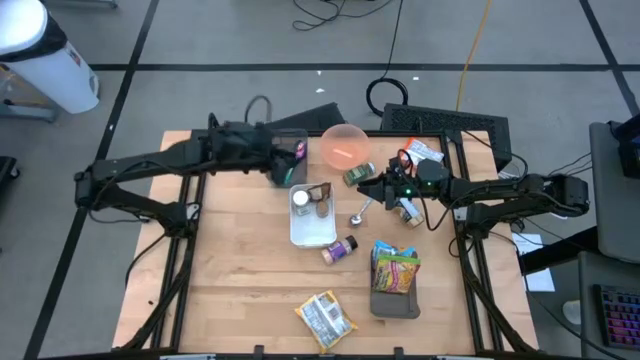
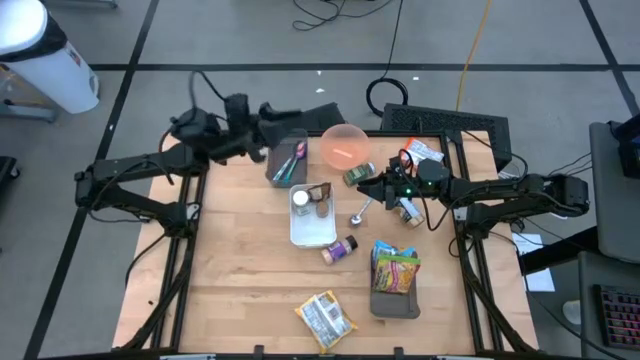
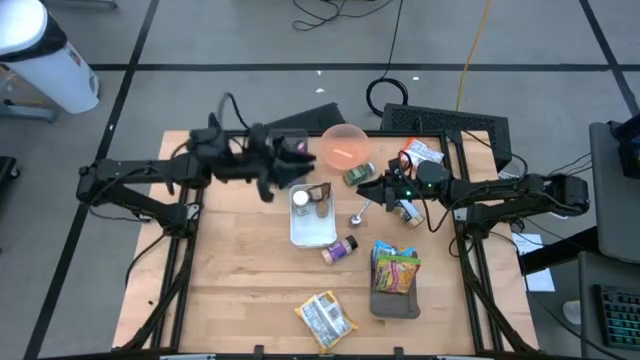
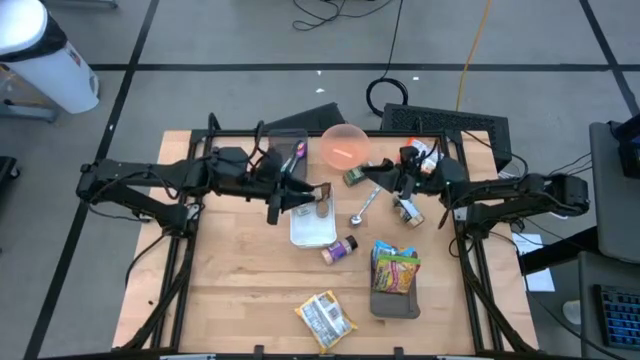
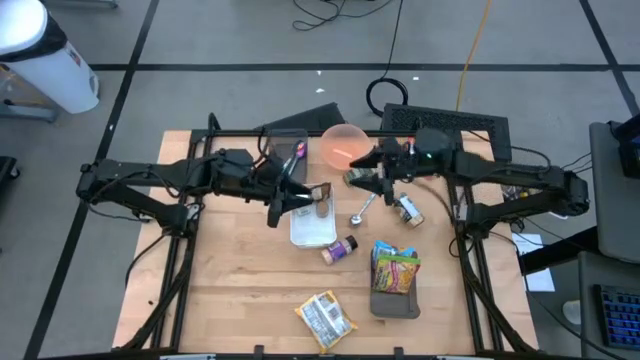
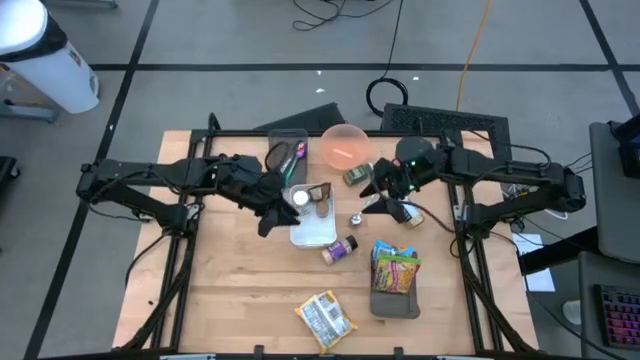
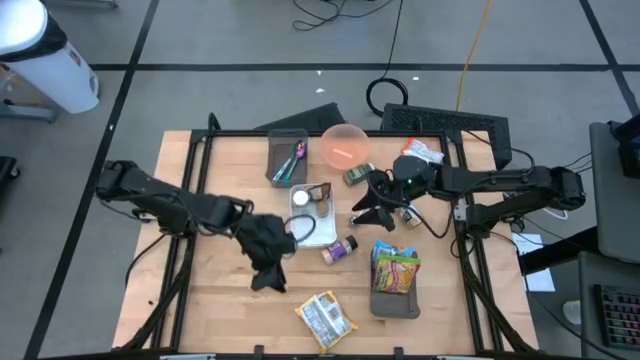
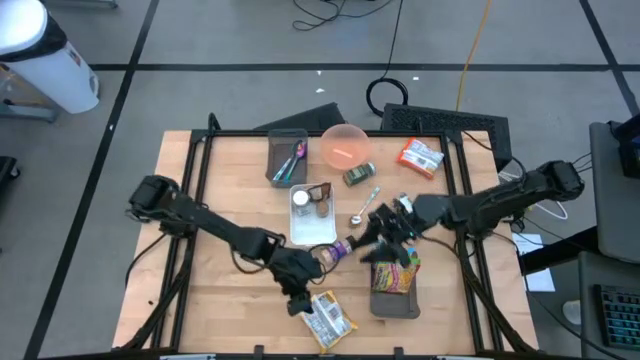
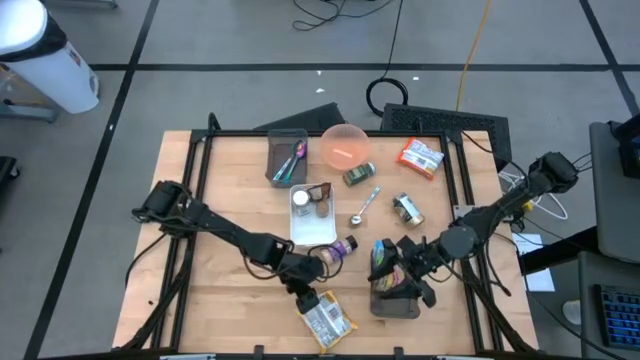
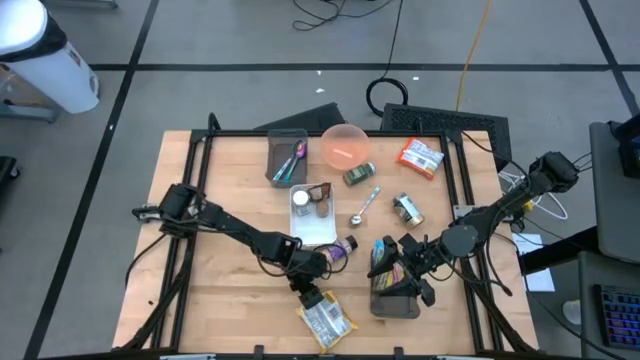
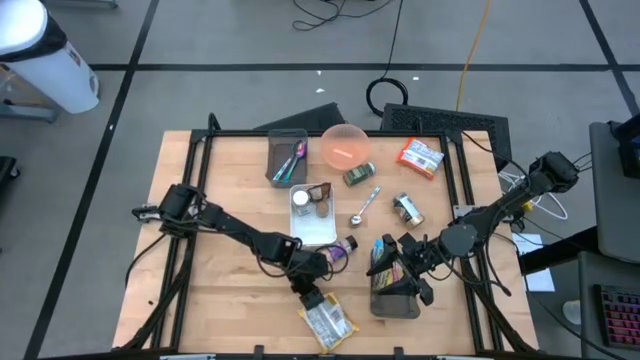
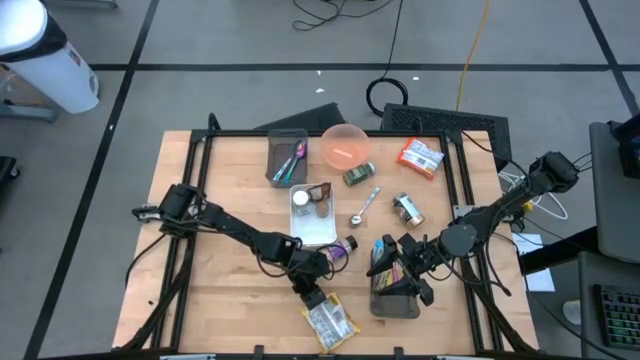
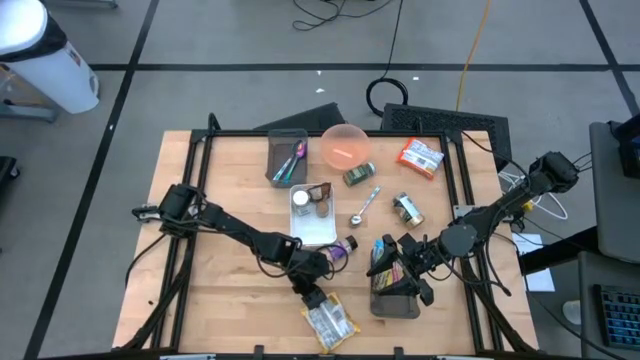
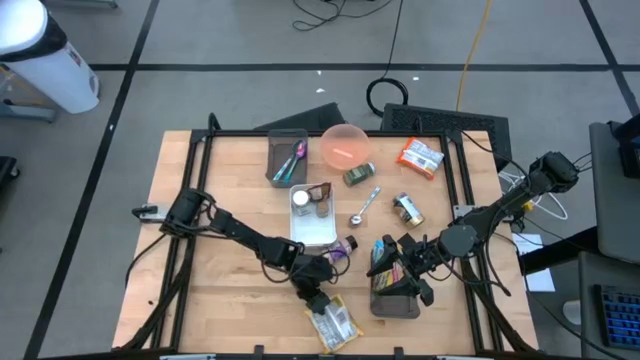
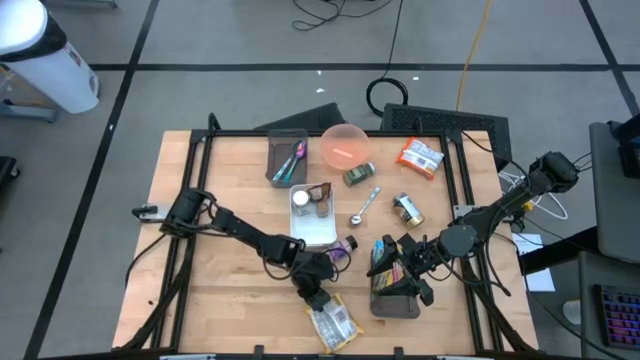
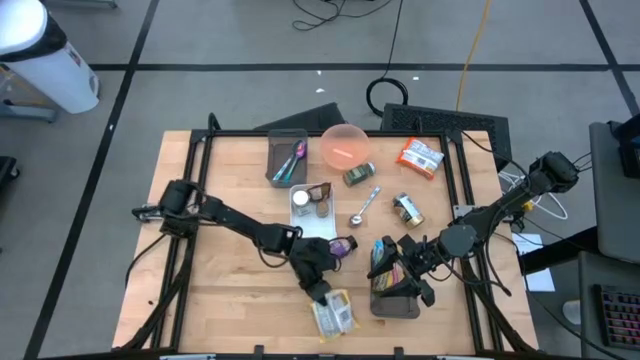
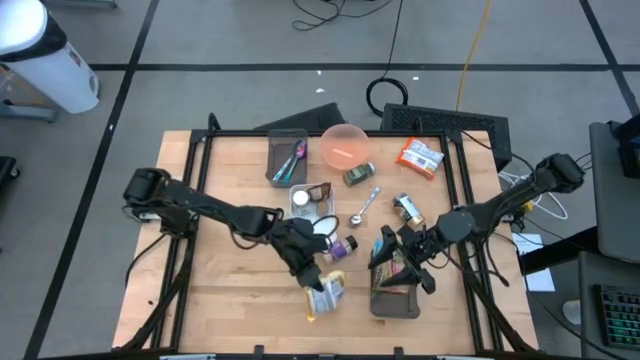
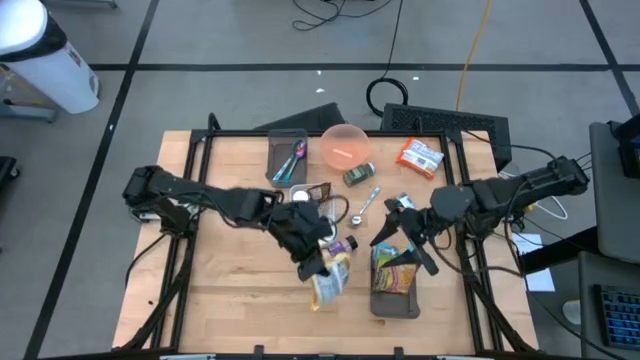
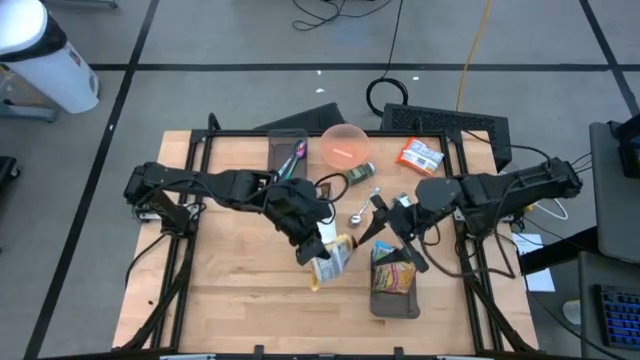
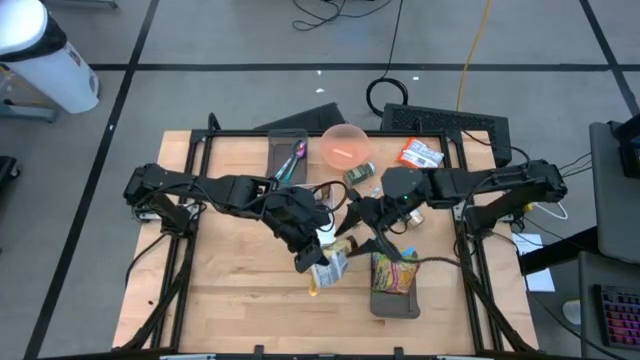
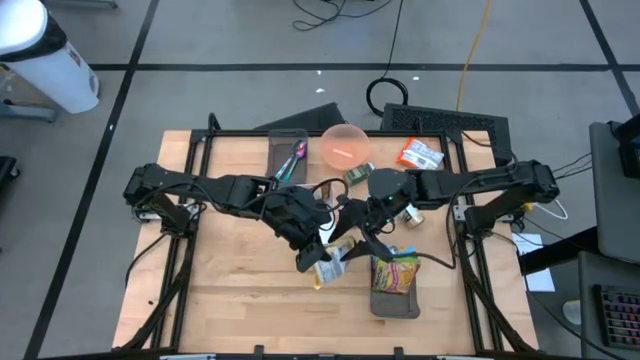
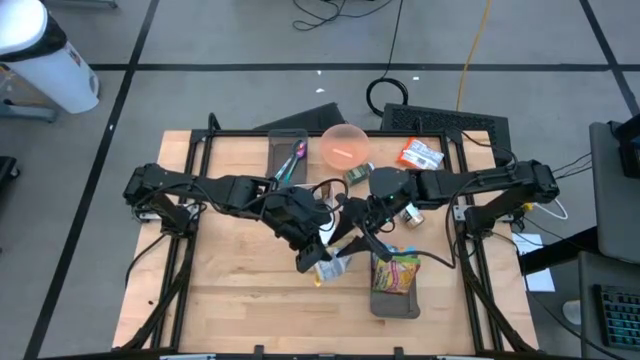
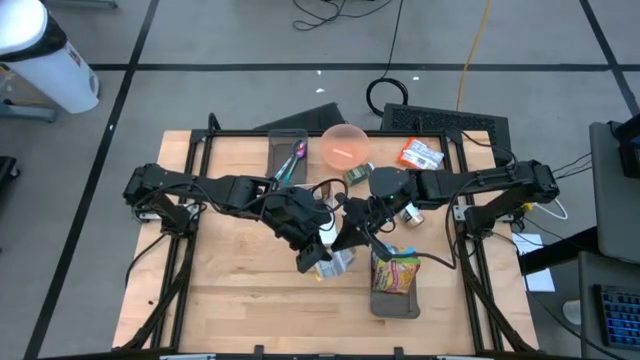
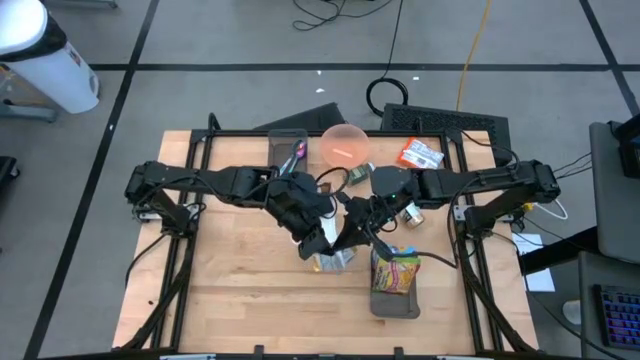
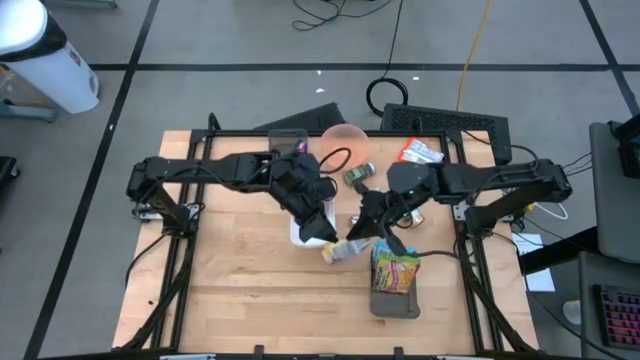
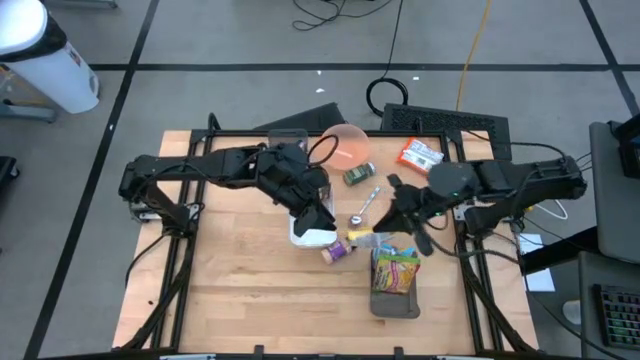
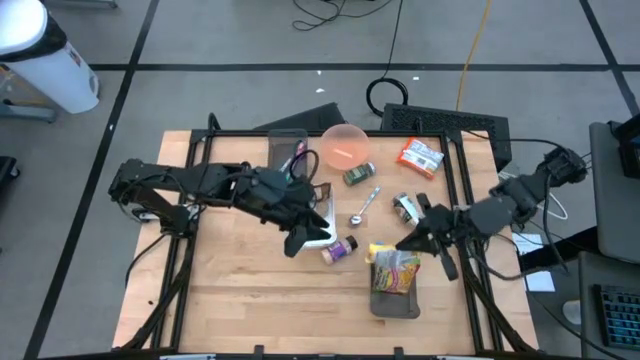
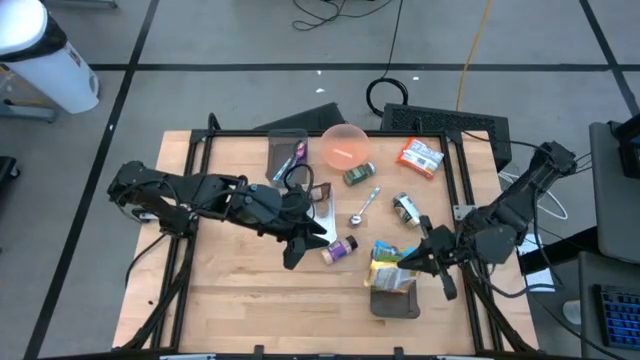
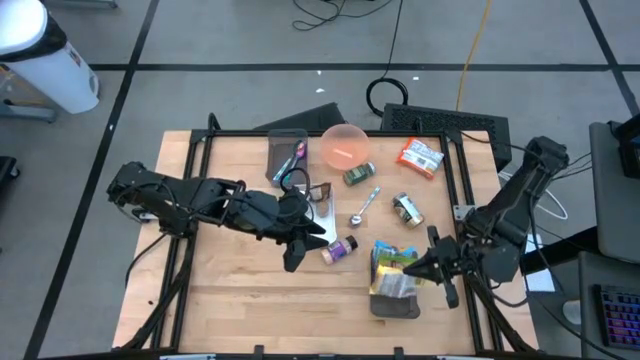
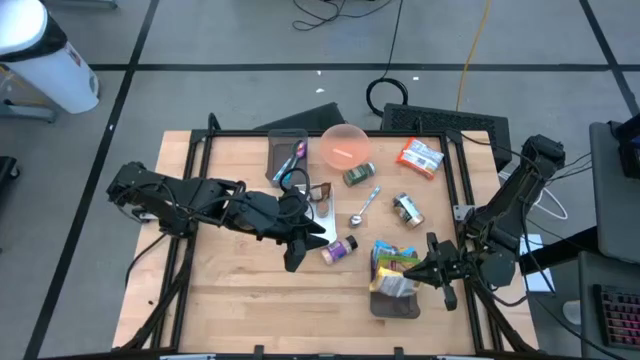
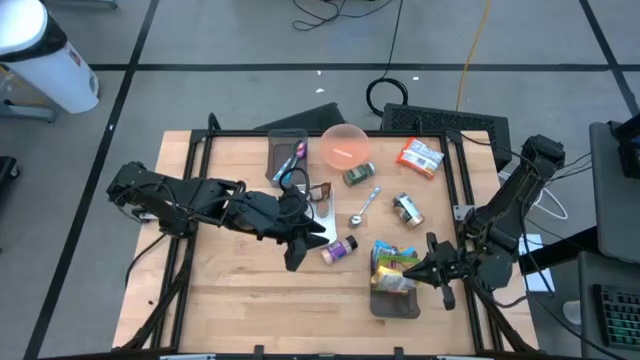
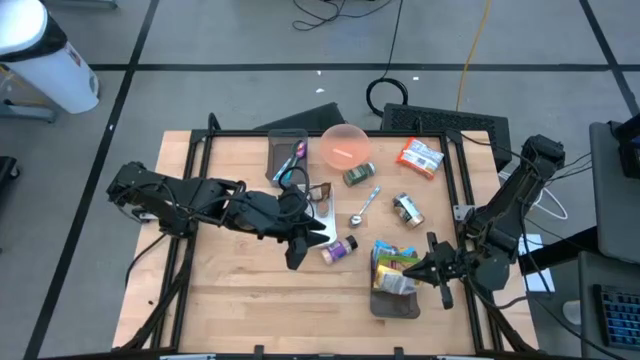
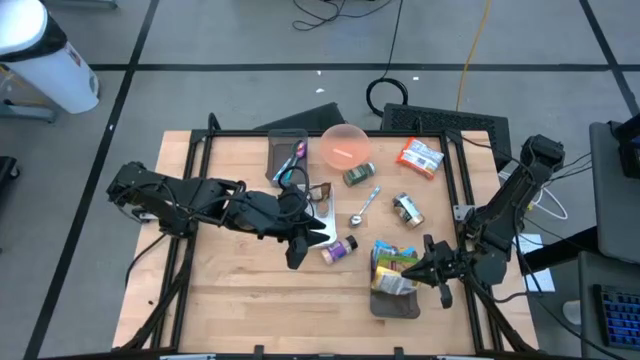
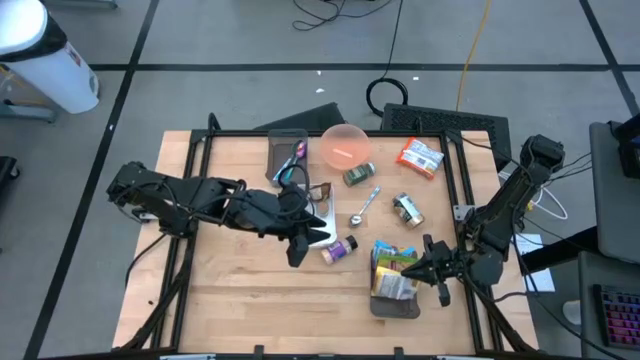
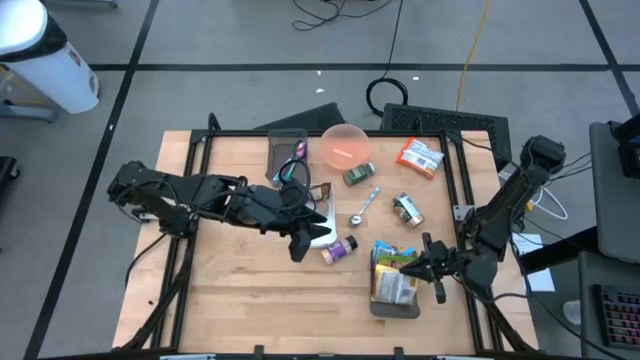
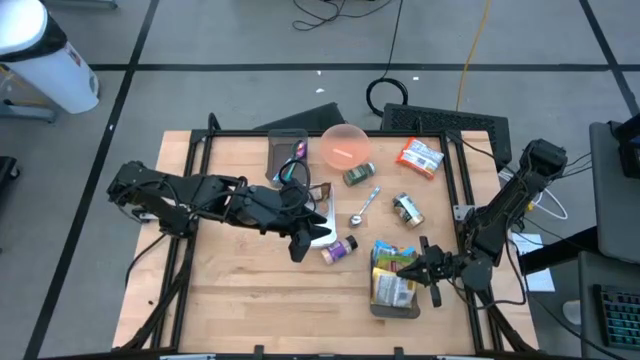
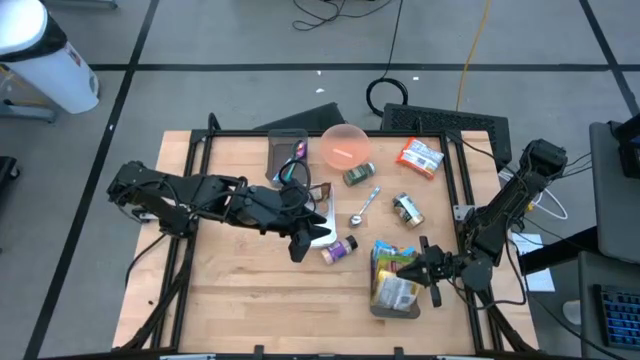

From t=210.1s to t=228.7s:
Task: Pick & Place Food Item
Put the yellow noodle pack into the bottom black transparent bin

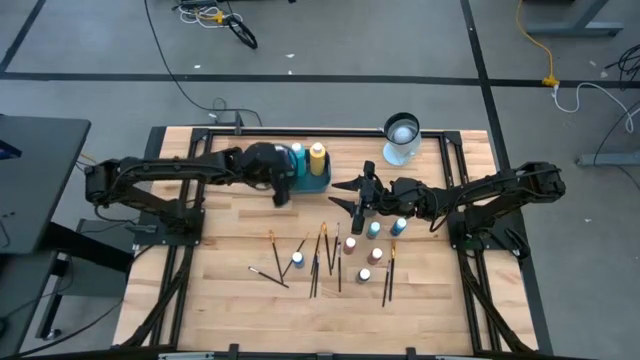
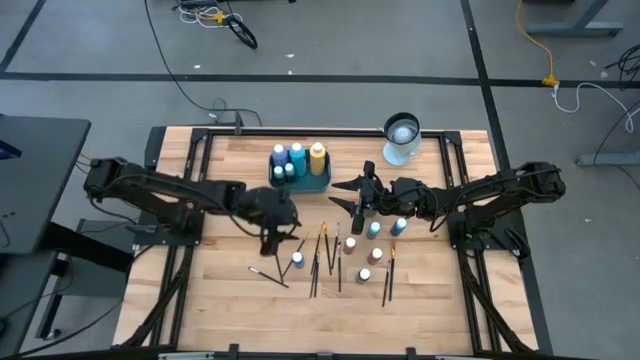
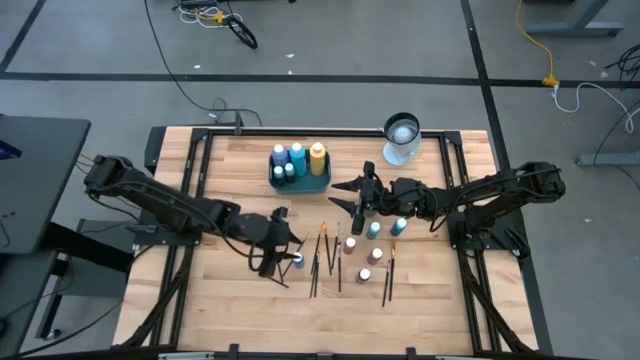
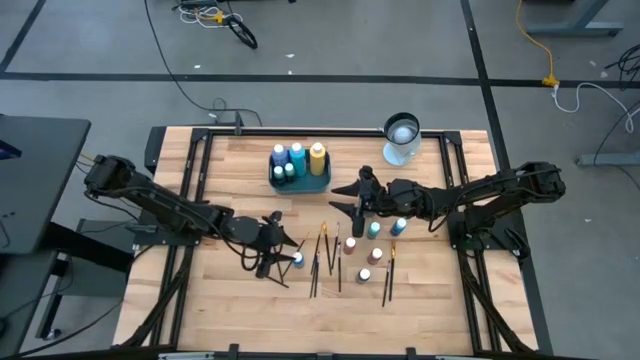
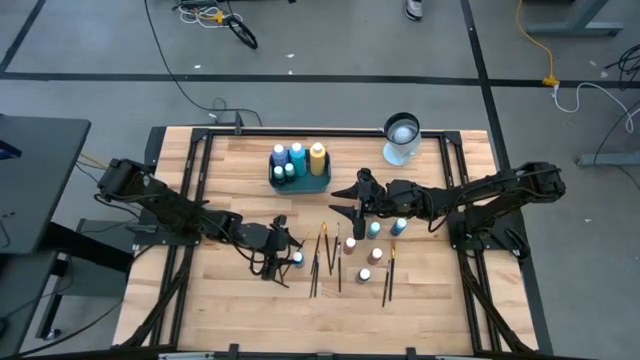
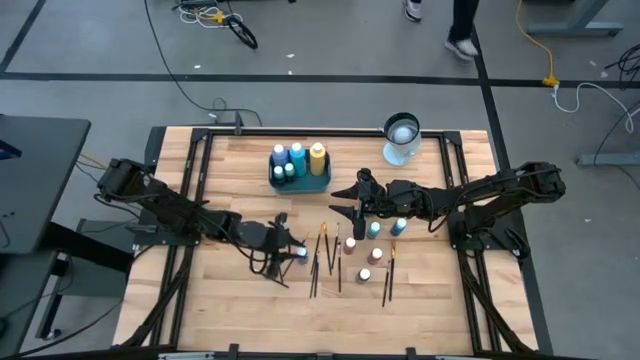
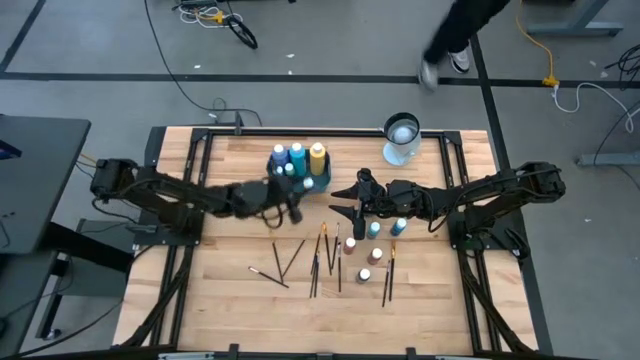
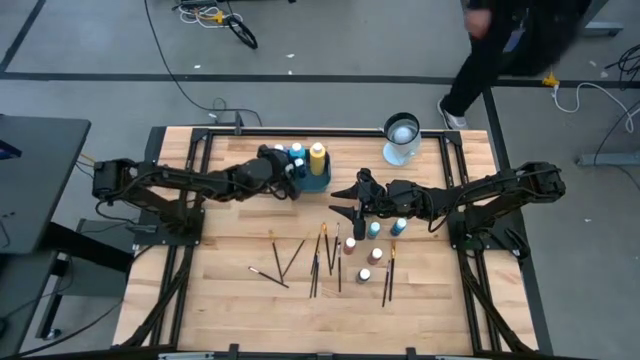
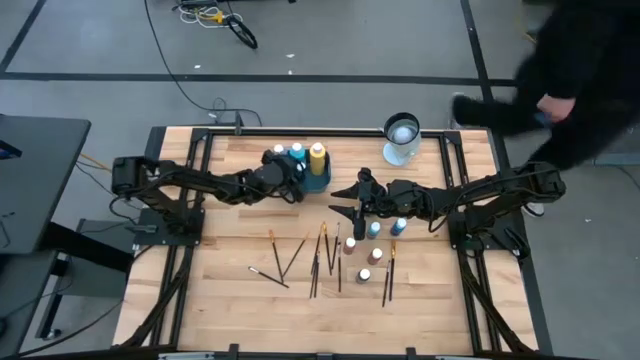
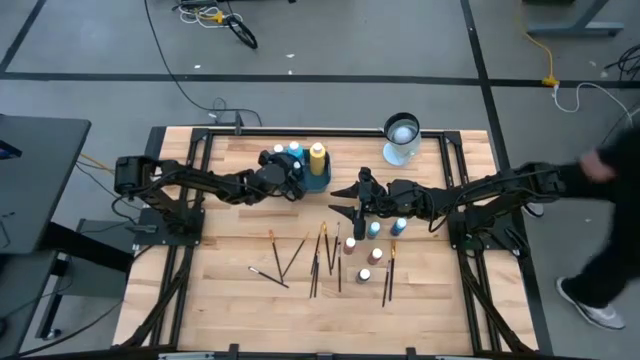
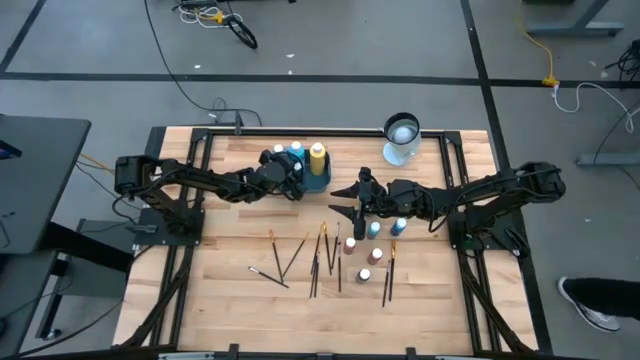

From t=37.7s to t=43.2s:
Task: Pick & Place Paint Supplies
Put the blue paint bottle into the blue bin
